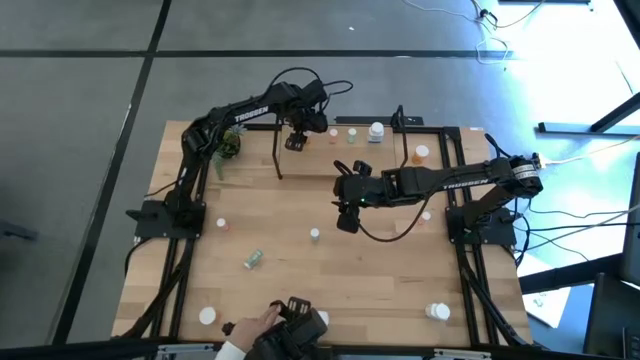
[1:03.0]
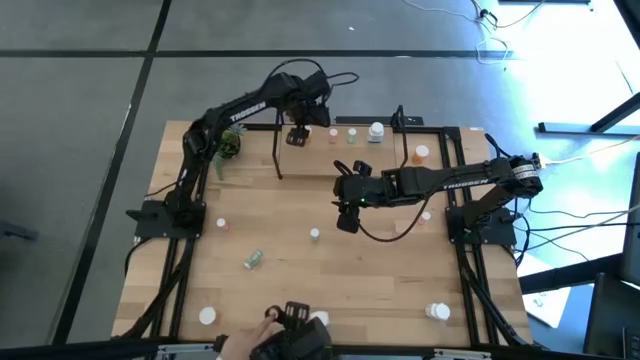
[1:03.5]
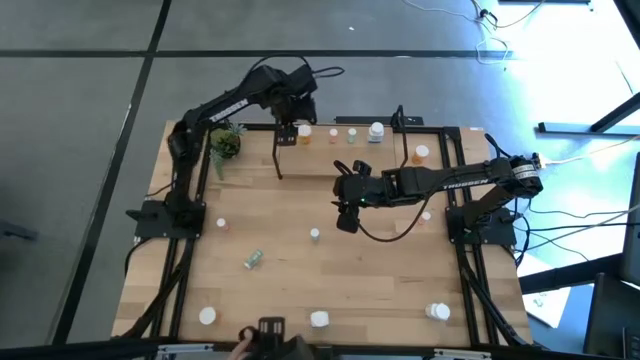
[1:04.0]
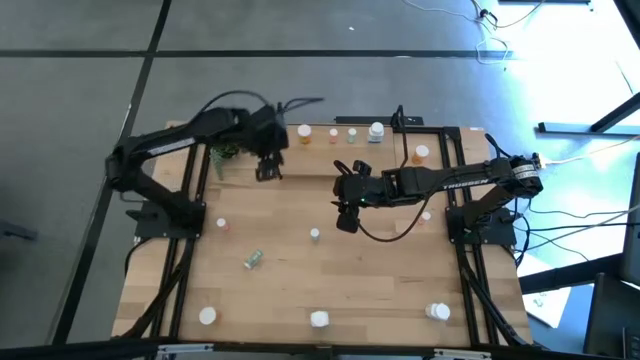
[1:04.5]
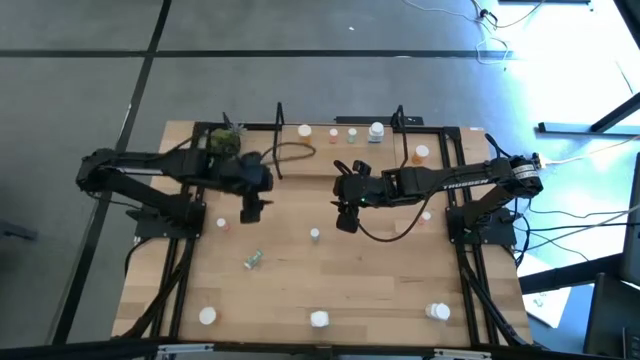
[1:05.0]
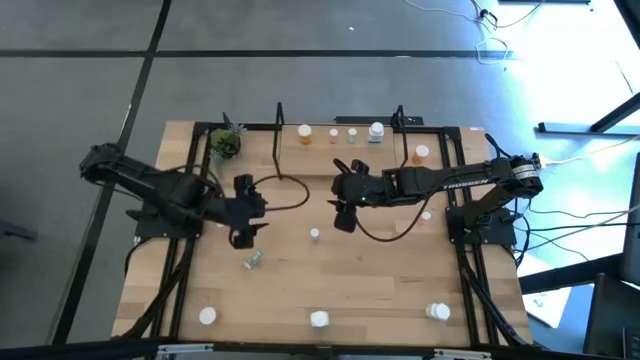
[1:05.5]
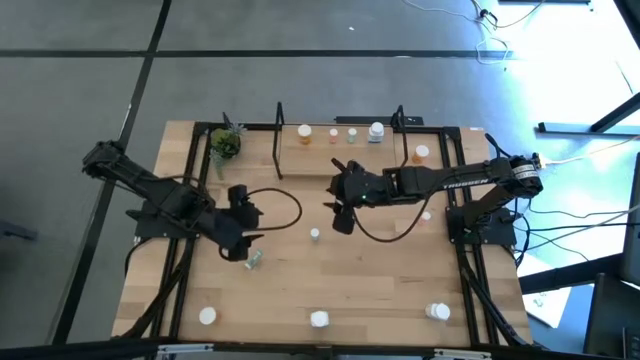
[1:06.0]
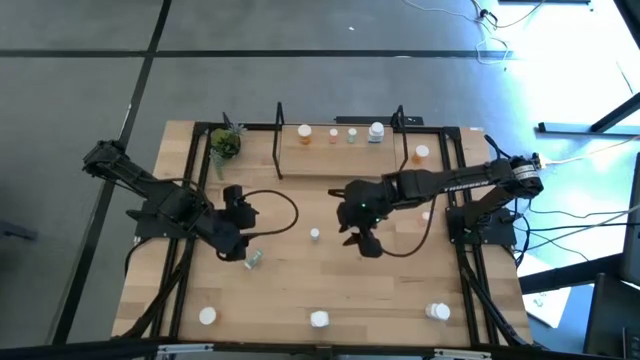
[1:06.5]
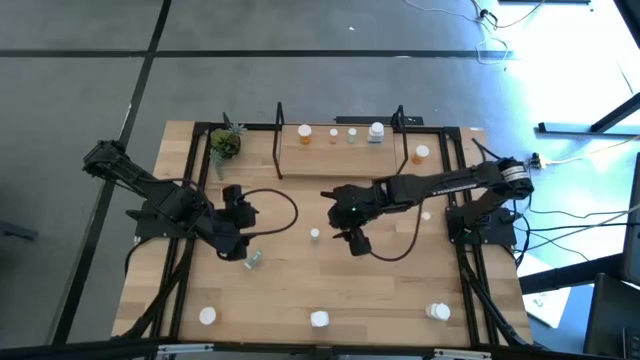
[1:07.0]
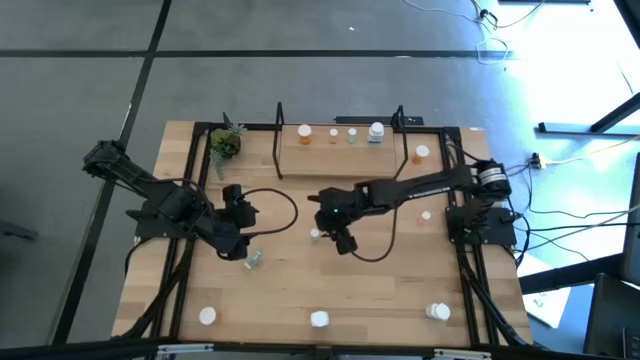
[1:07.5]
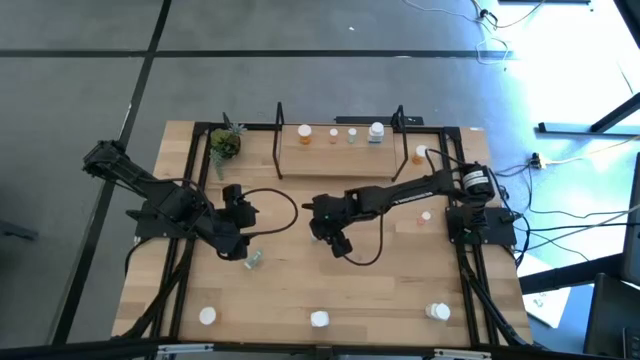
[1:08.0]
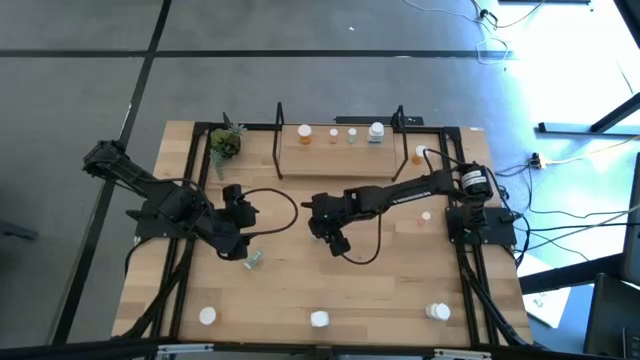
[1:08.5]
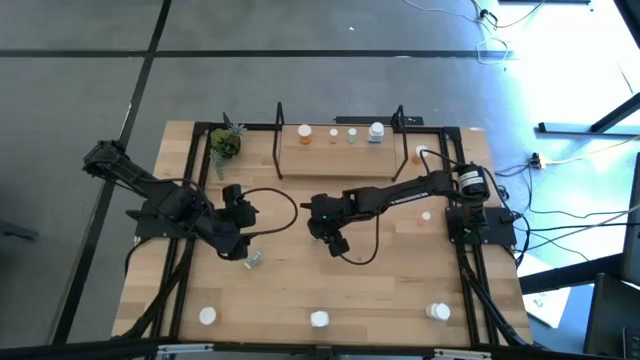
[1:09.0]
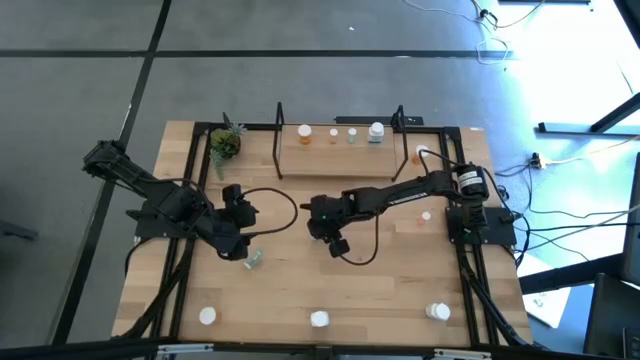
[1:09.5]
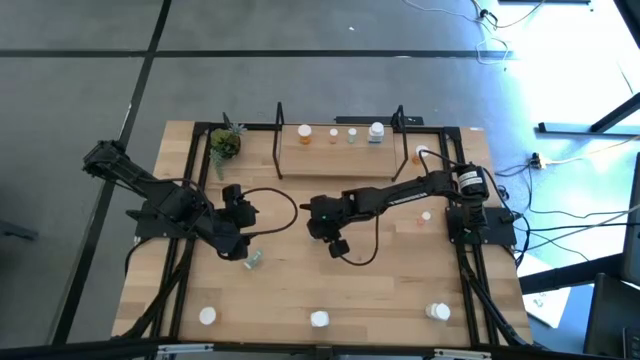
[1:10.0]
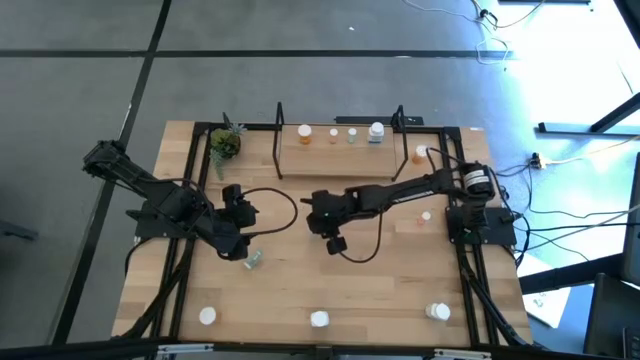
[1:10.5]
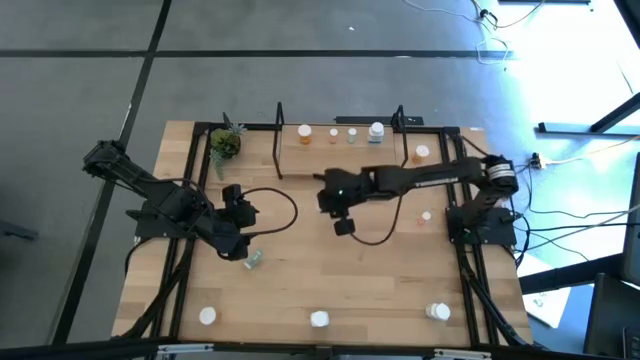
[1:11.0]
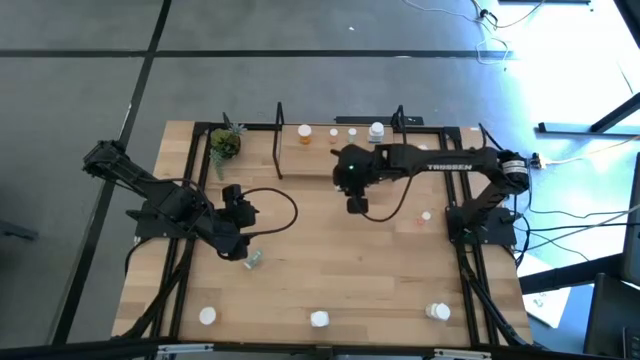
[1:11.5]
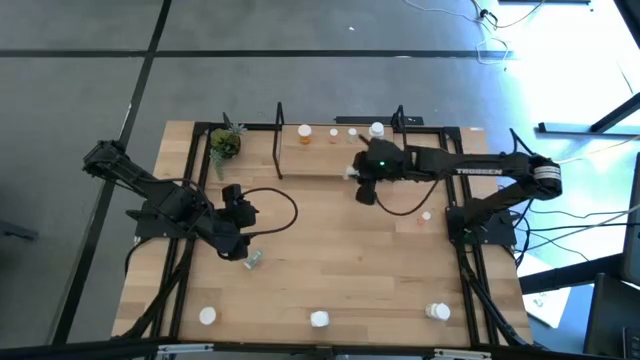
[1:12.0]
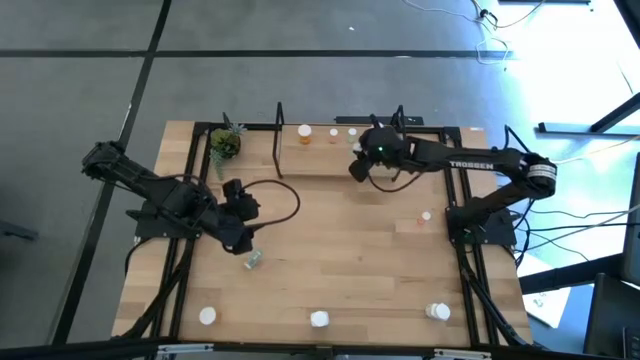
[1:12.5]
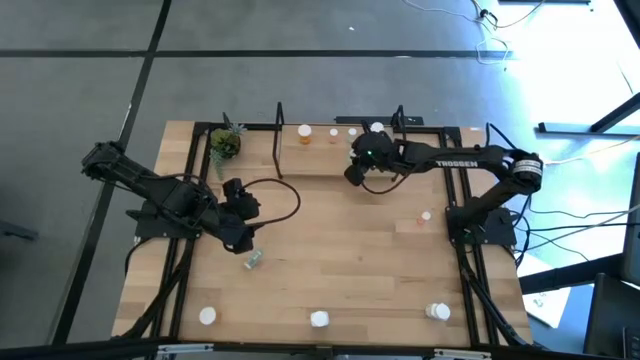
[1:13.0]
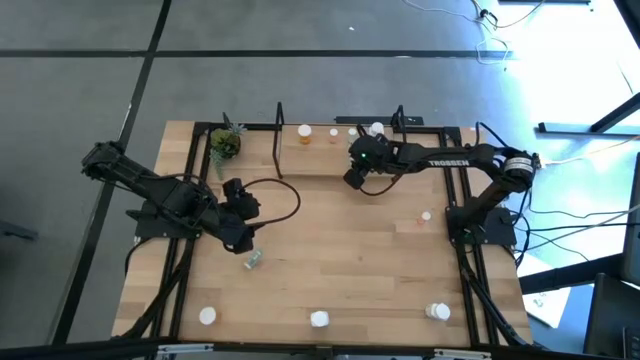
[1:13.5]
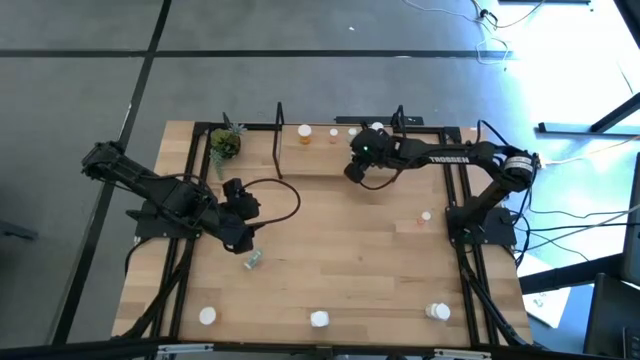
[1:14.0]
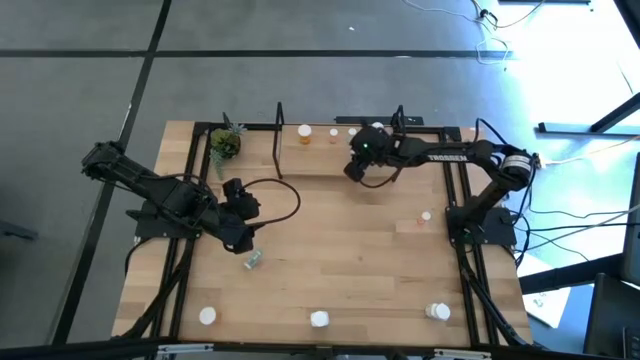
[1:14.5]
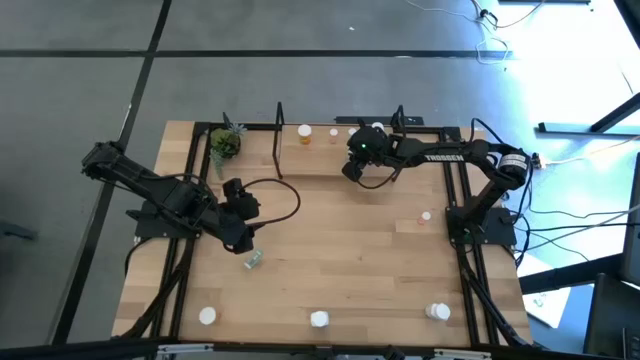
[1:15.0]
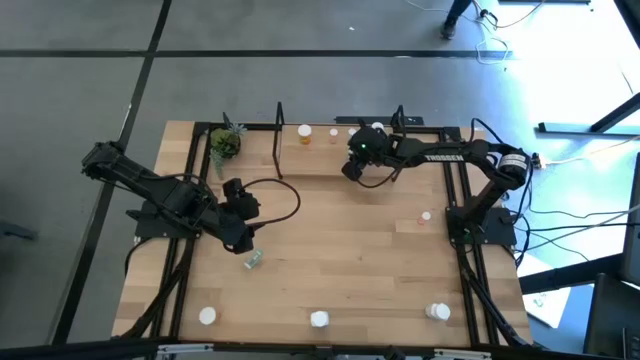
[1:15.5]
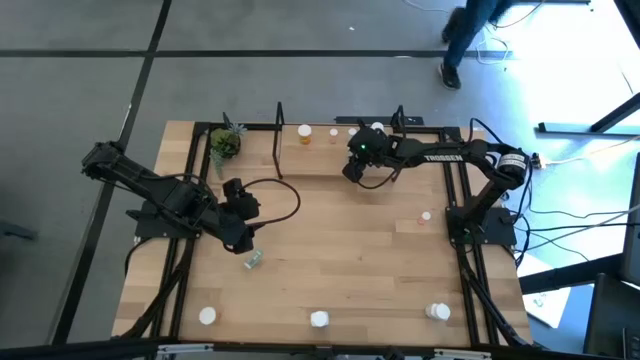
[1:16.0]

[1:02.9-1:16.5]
Task: Pick and place medicine bottles onto shelf by color
Put the right green pill bottle on the shelf aligned with the green bottle

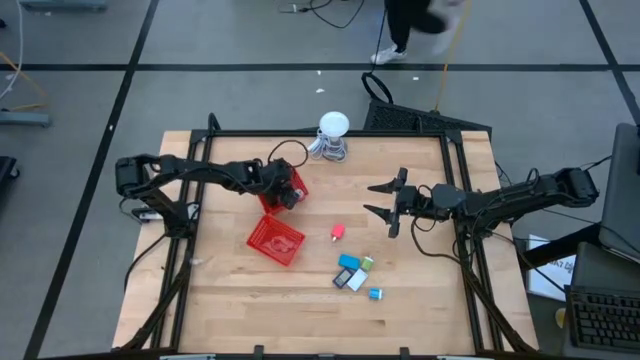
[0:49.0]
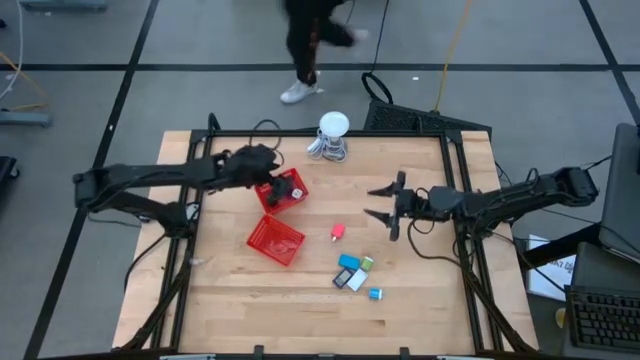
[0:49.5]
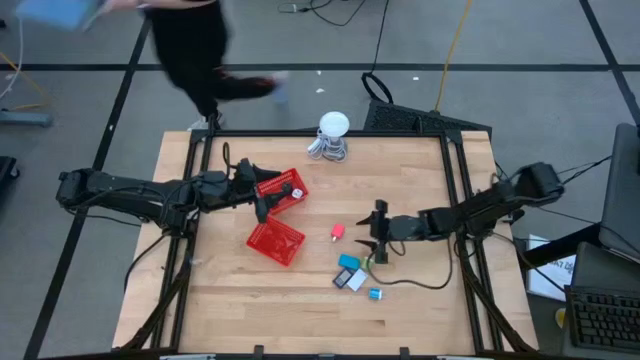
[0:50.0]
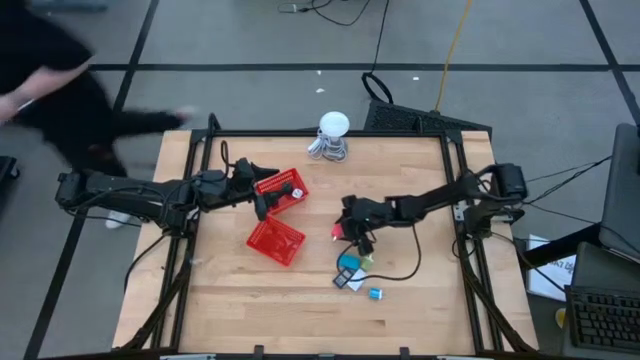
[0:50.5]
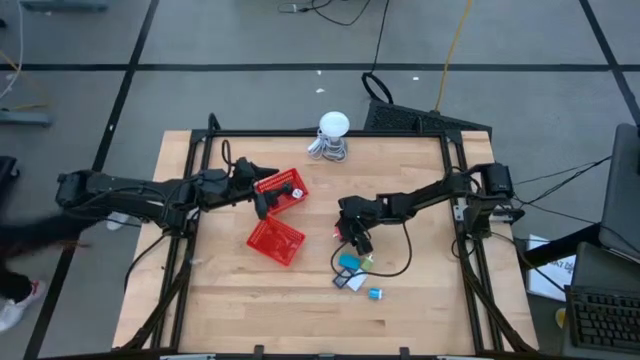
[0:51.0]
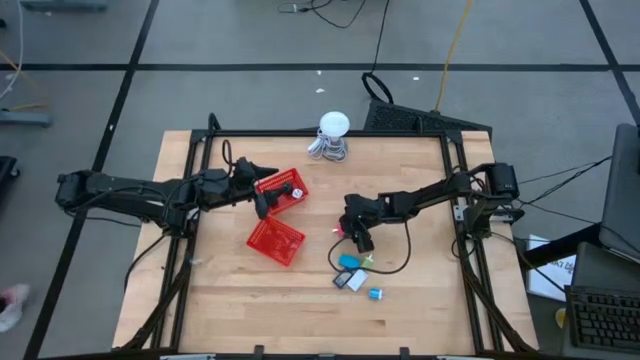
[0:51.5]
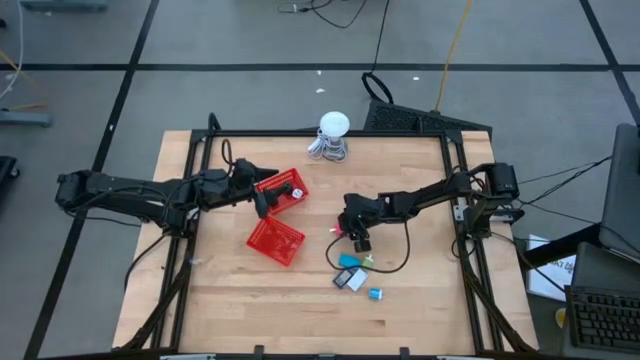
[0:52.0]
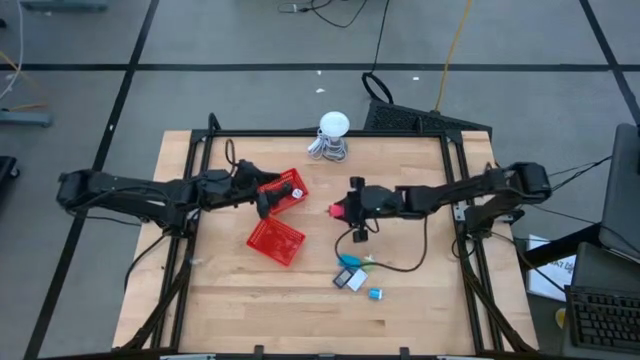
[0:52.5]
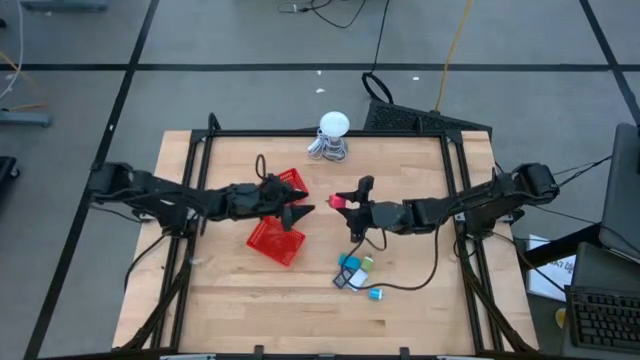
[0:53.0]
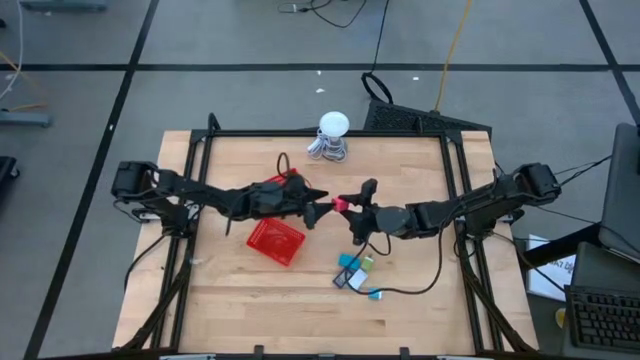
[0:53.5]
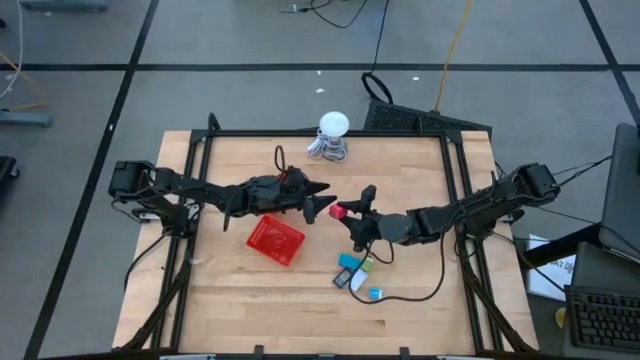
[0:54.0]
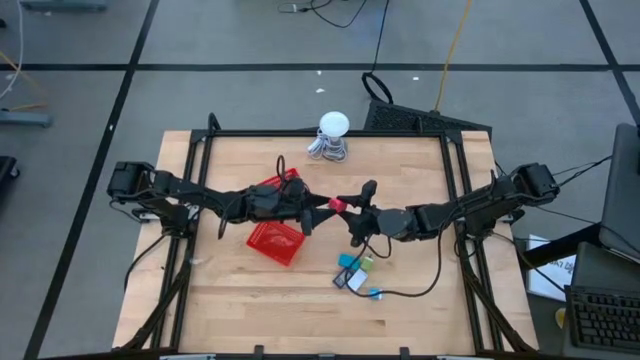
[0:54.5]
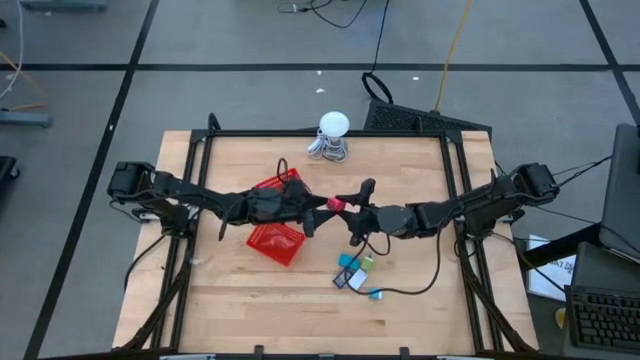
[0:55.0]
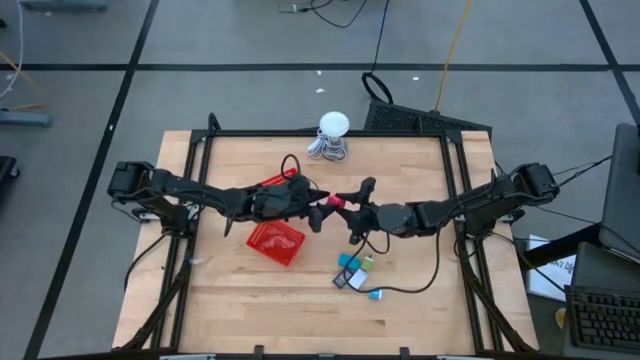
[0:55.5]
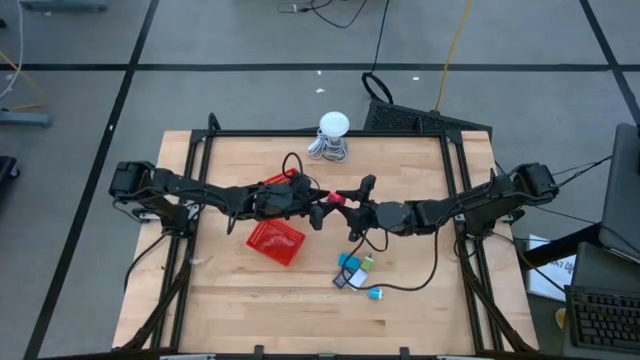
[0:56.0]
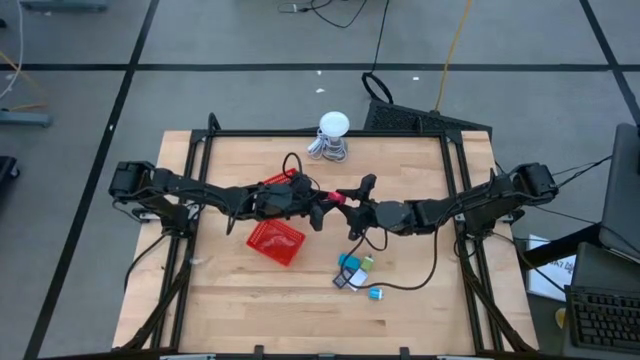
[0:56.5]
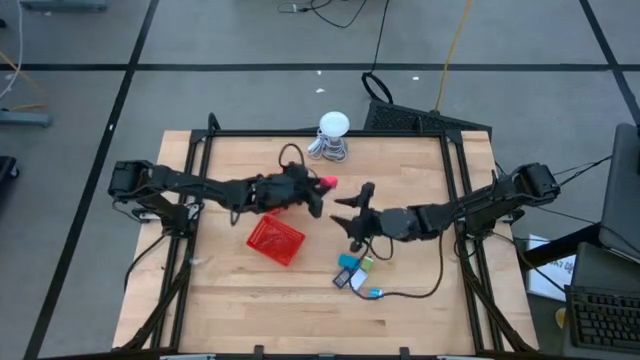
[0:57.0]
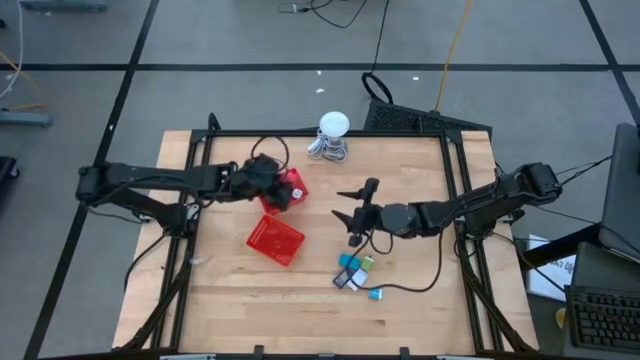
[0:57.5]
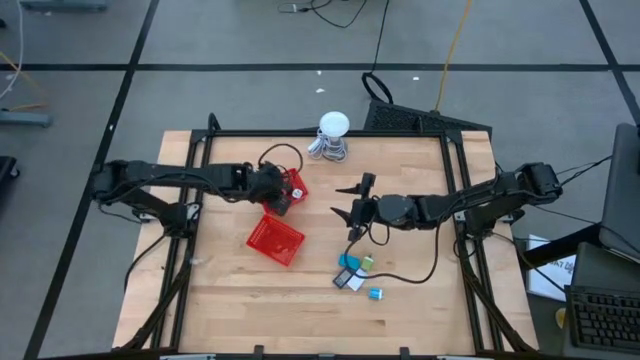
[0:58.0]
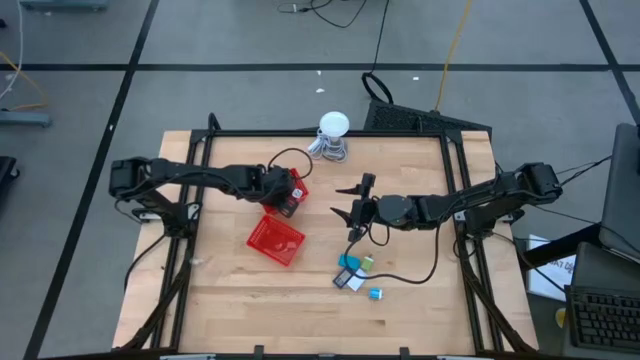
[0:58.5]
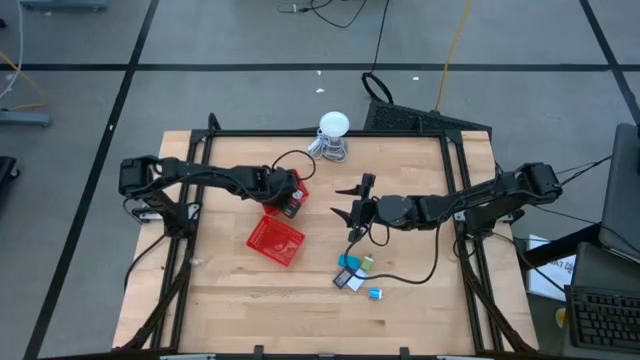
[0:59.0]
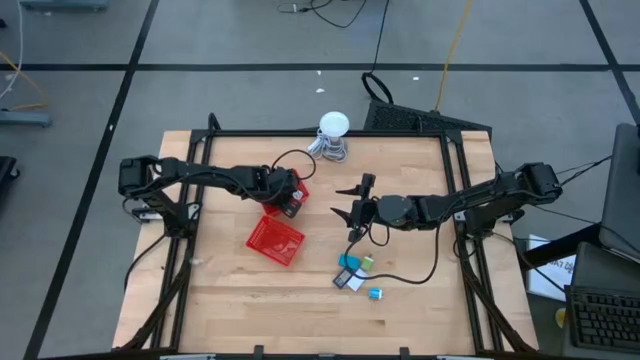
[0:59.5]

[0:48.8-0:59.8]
Task: Pick & Place Office items
Put the pink charger adapter into the top red basket
